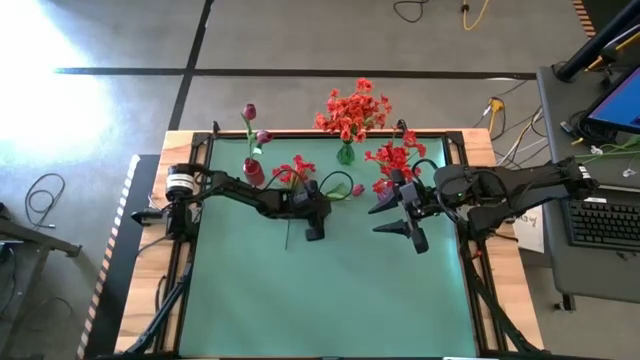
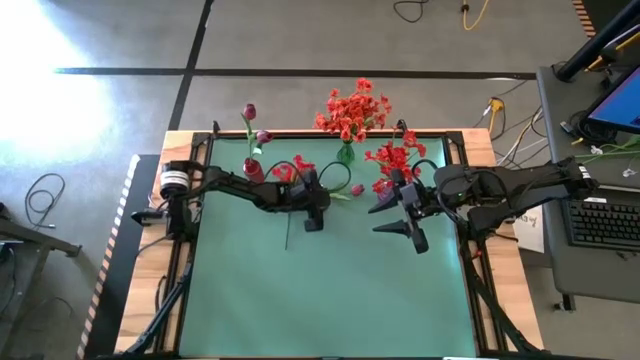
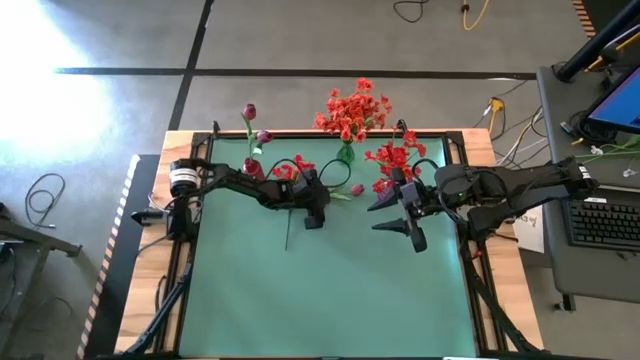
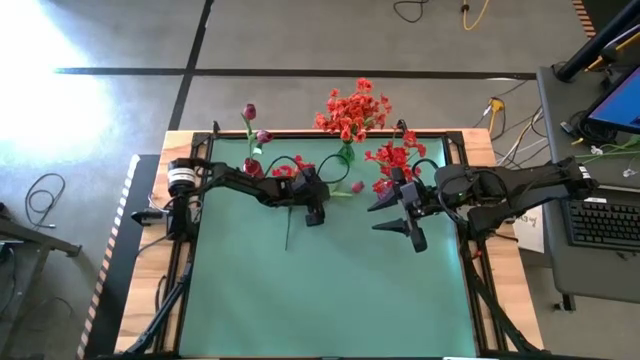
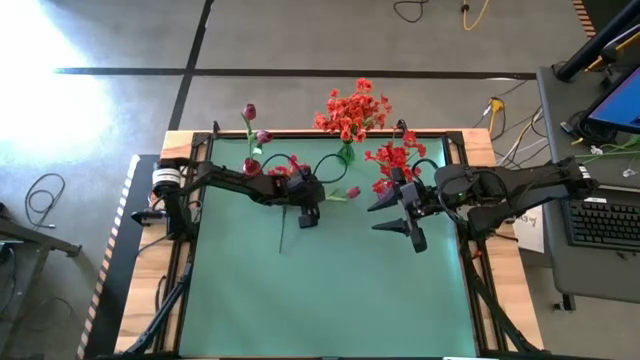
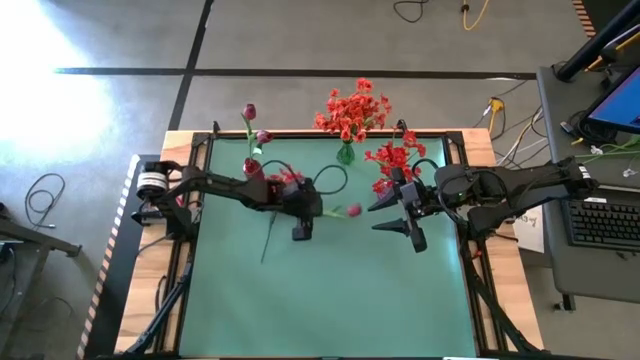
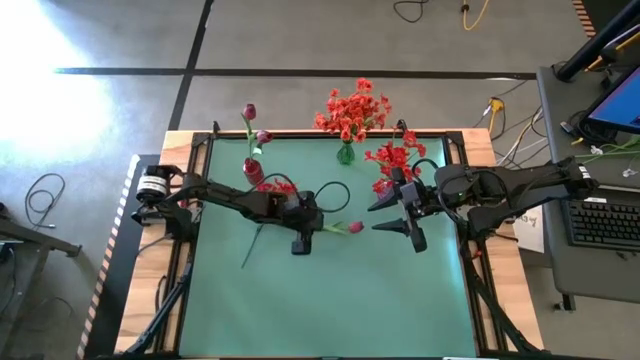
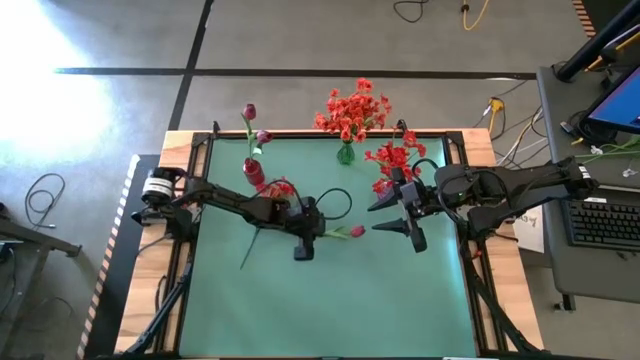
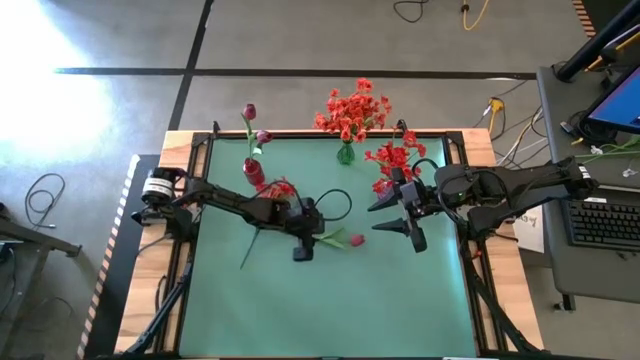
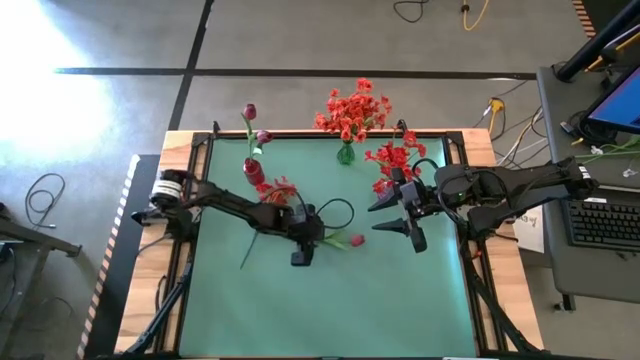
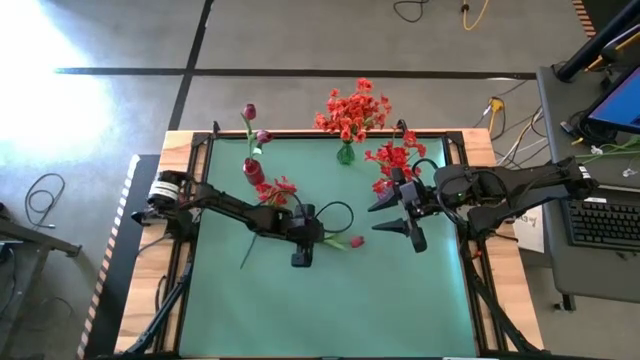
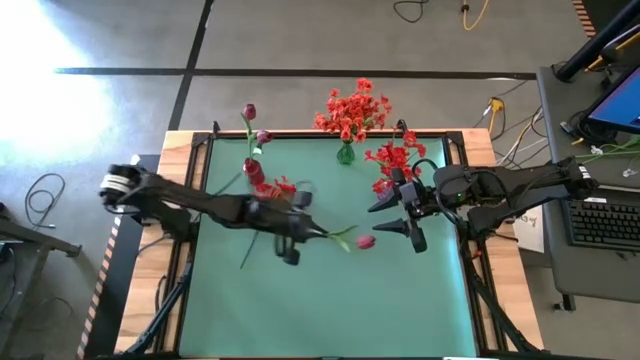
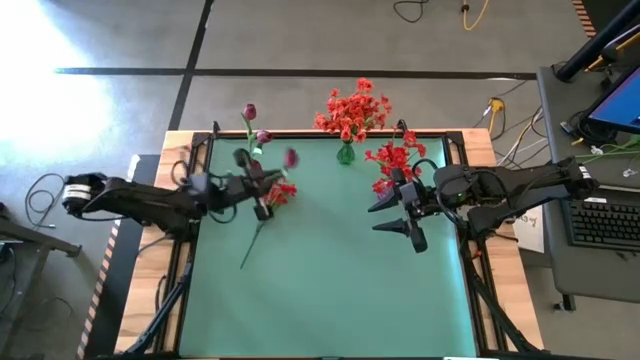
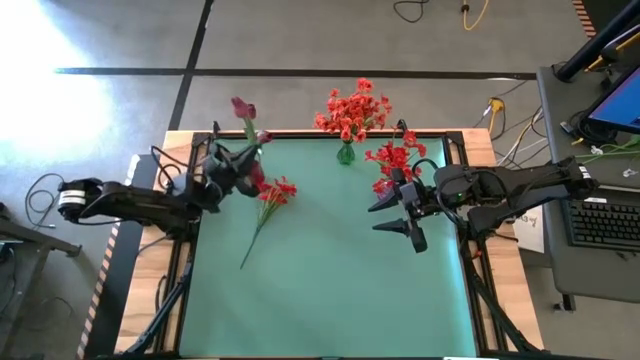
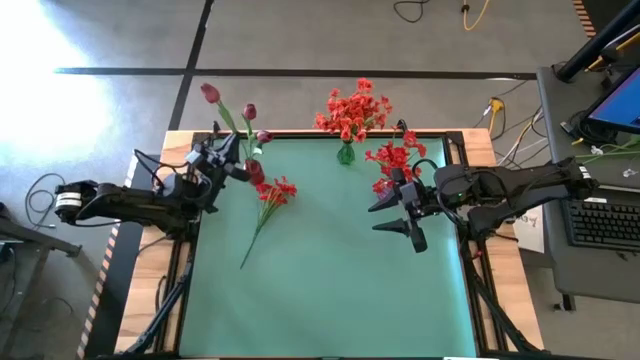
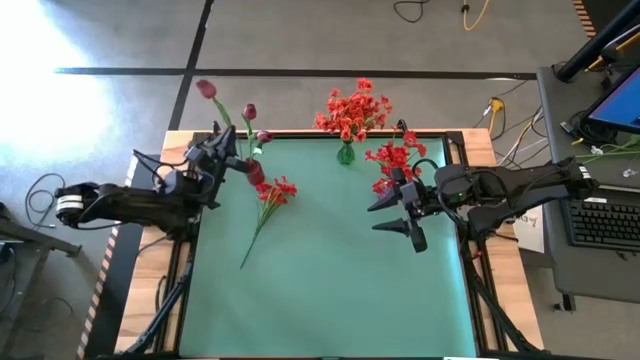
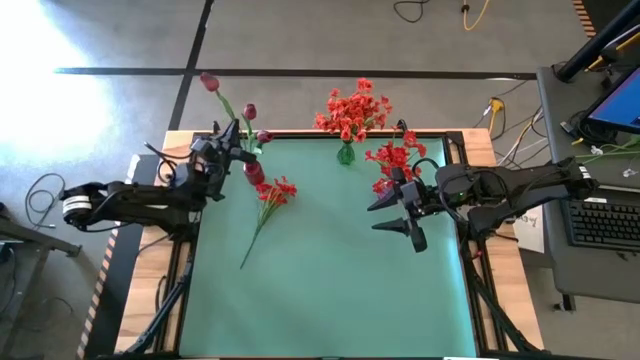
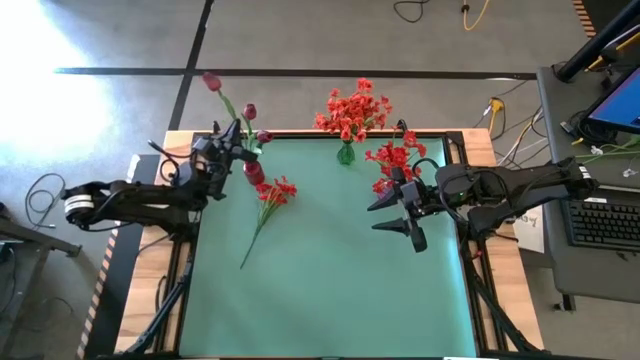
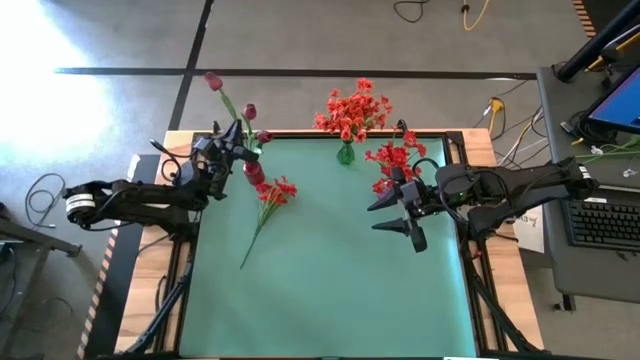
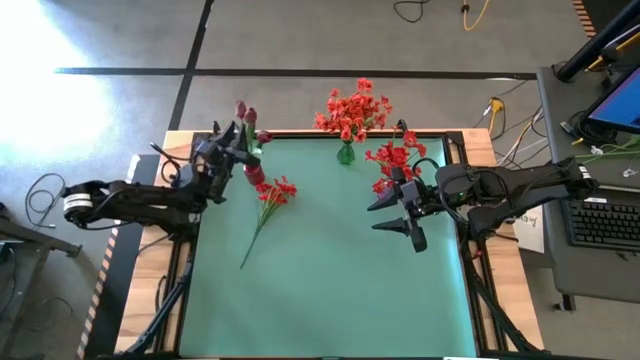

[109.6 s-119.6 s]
Task: Sort flowers into vase by color
Put the dark red flower into the red flower vase

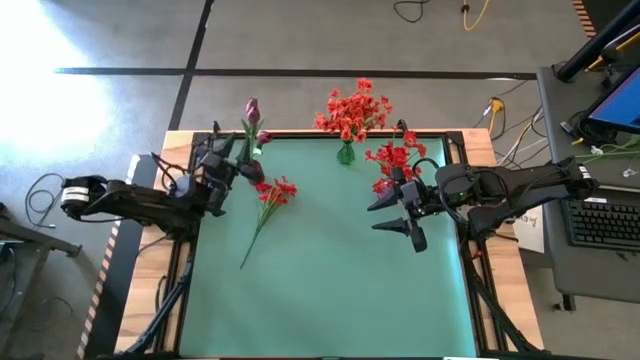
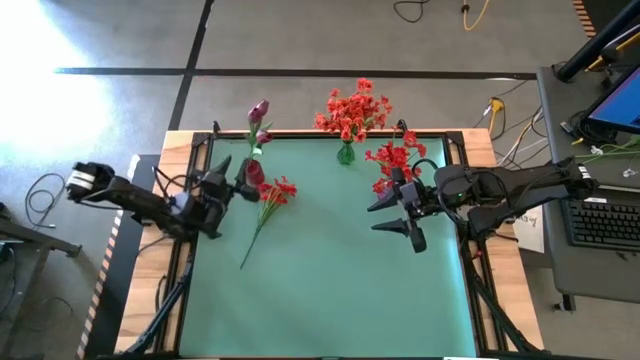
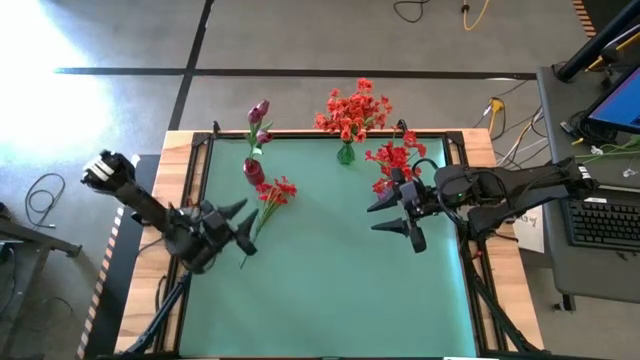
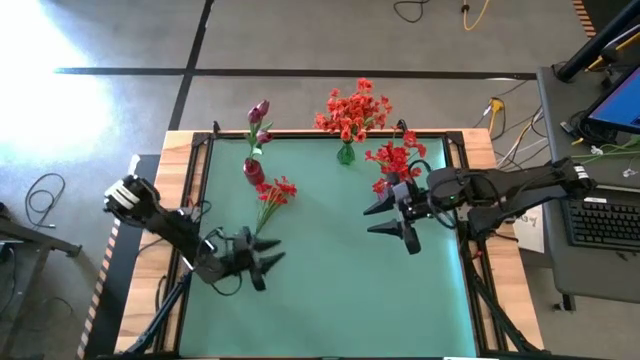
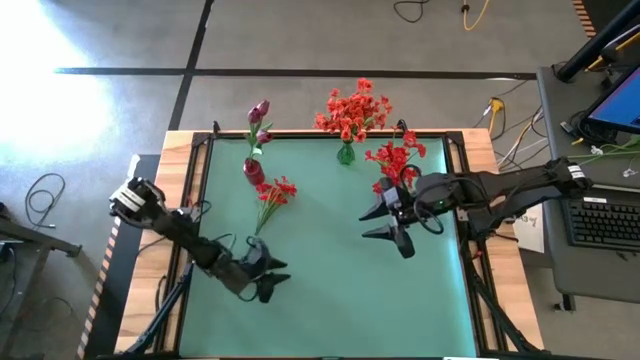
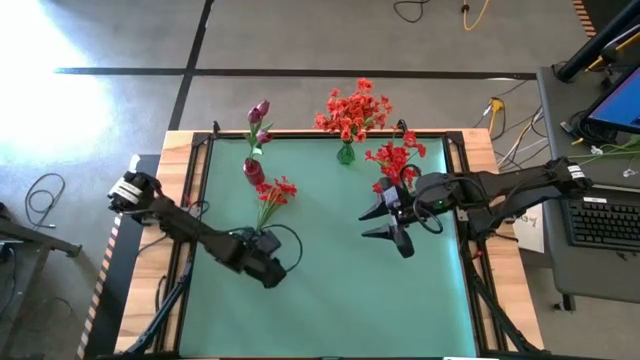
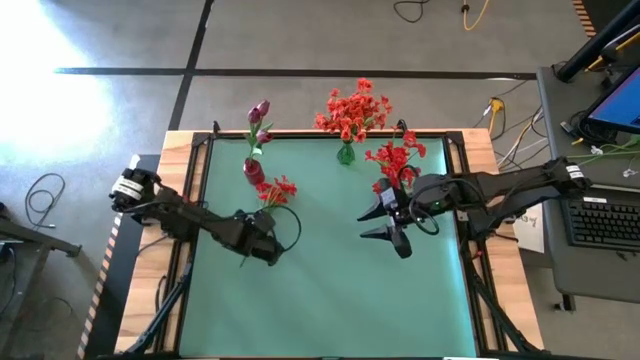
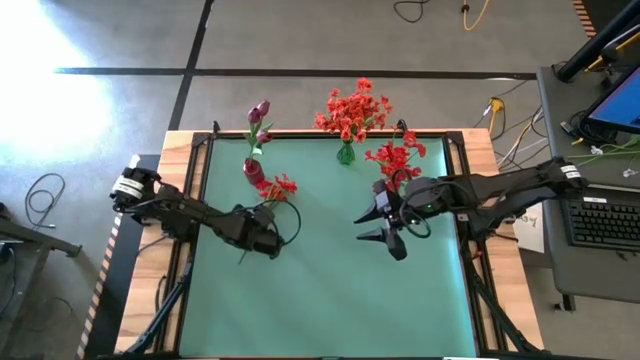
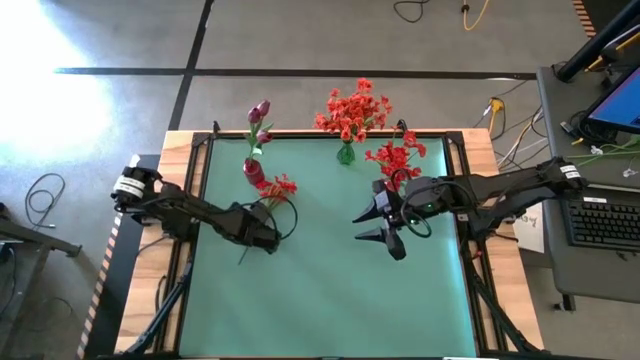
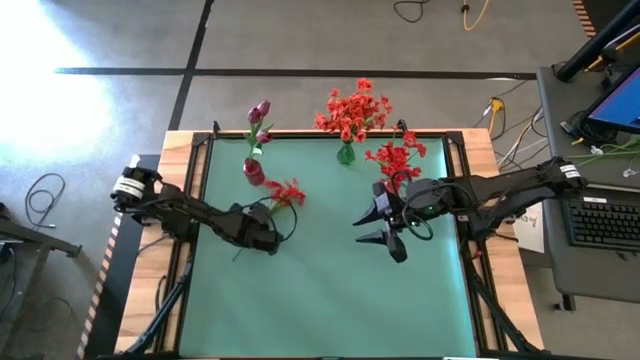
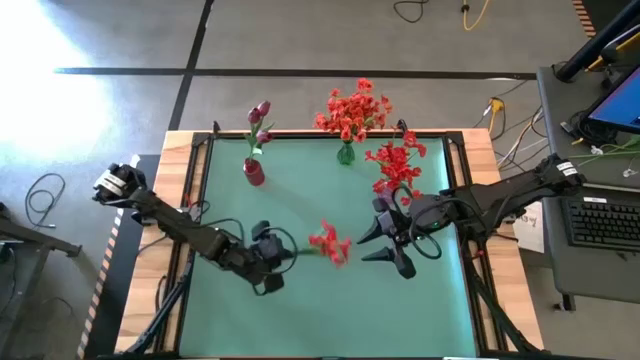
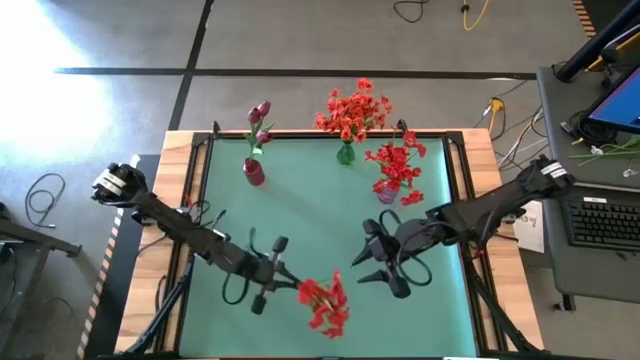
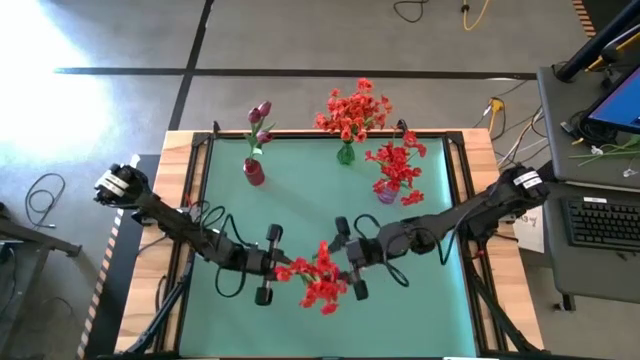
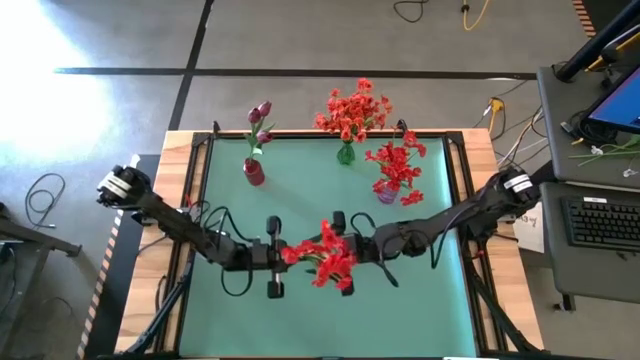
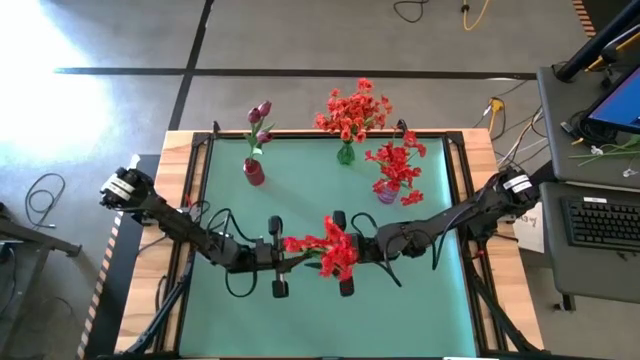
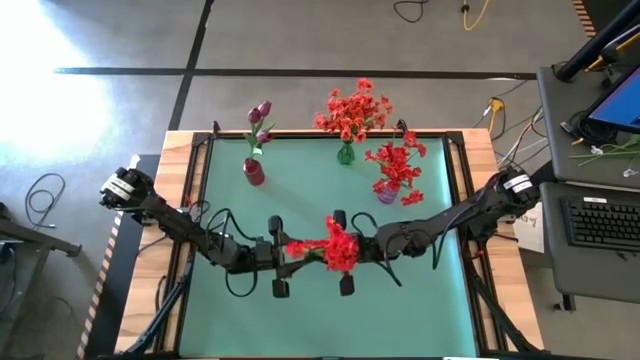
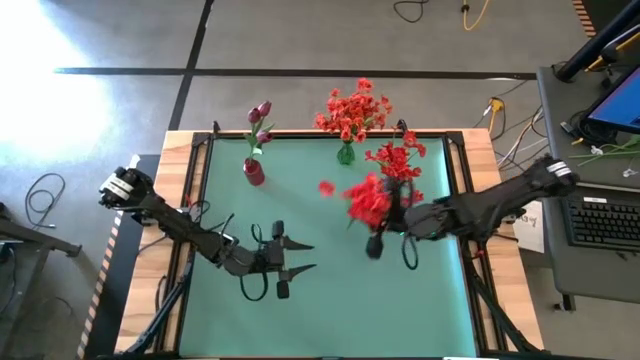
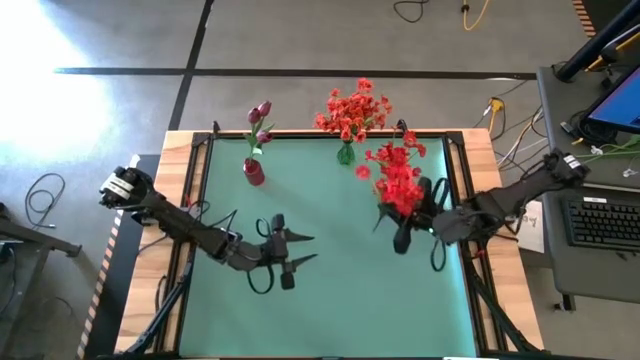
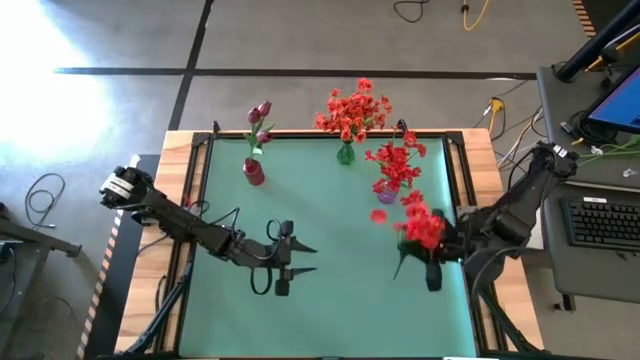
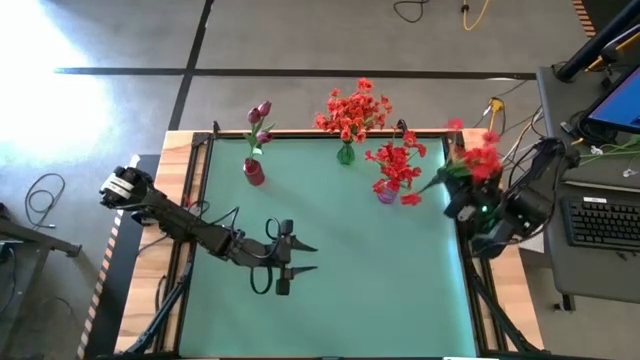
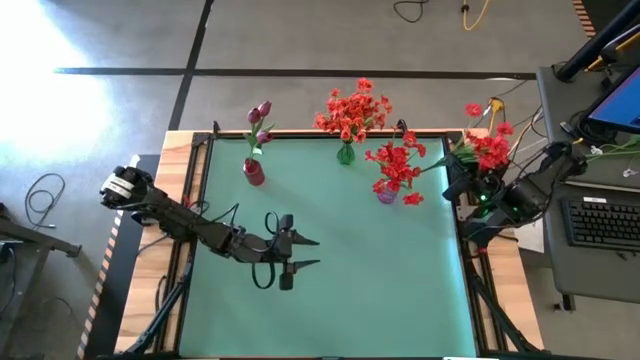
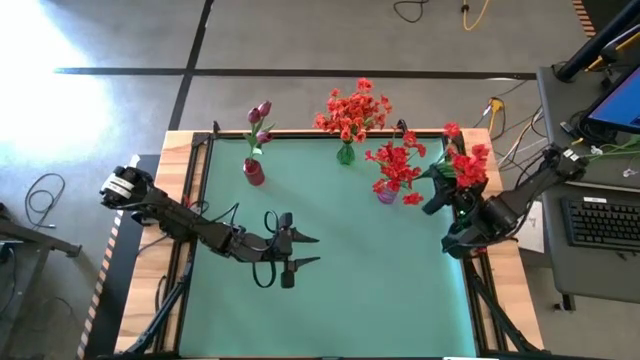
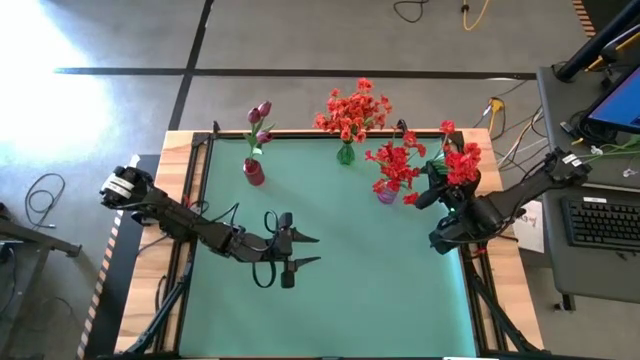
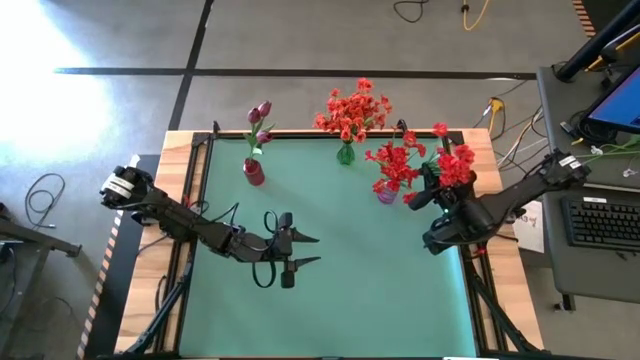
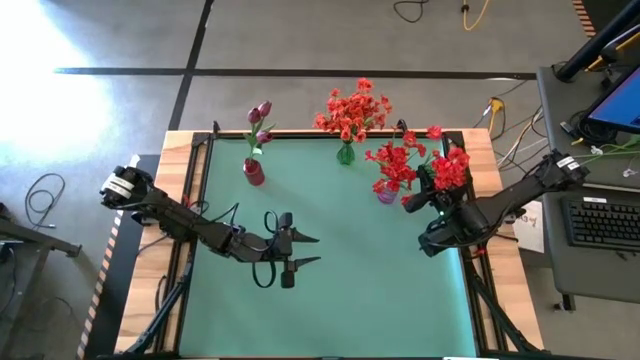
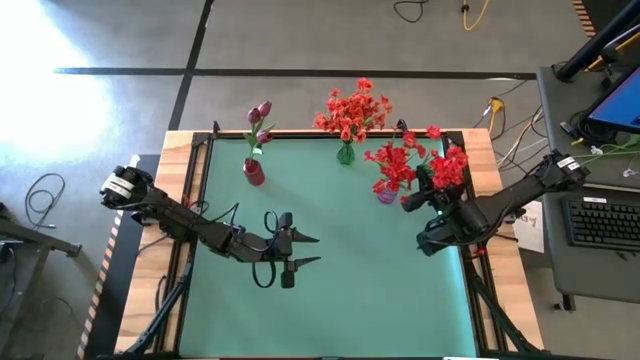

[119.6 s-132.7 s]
Put the red flowers into the violet flower vase
